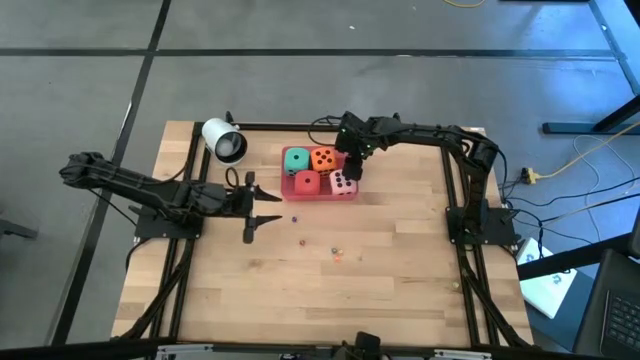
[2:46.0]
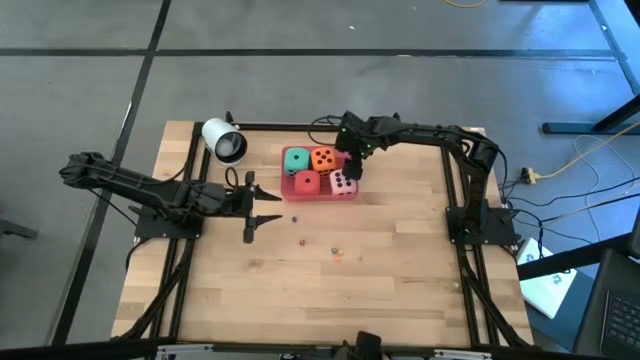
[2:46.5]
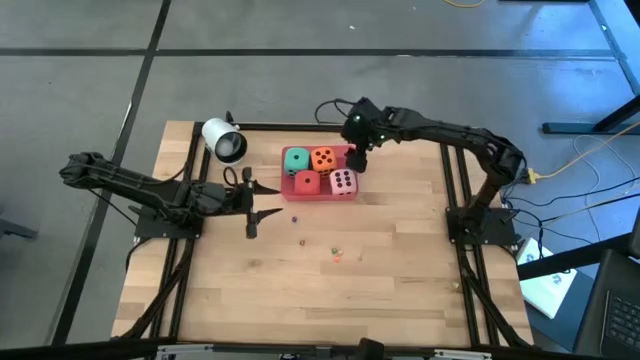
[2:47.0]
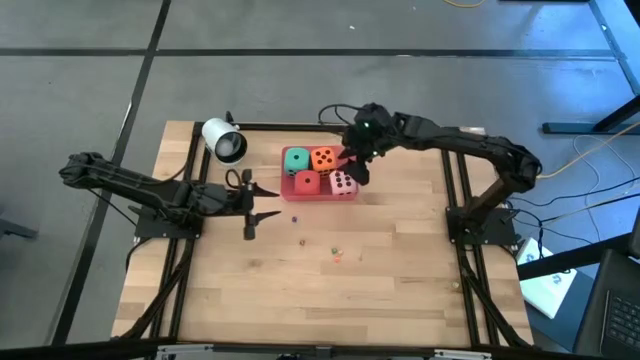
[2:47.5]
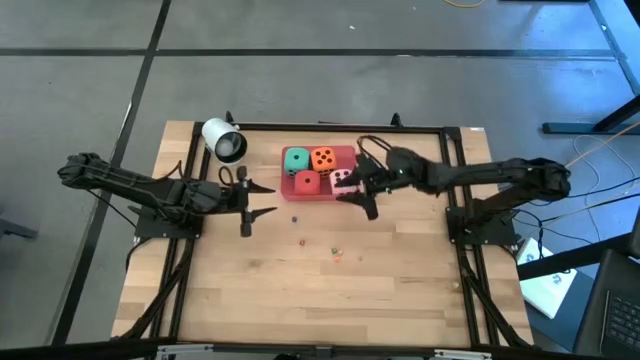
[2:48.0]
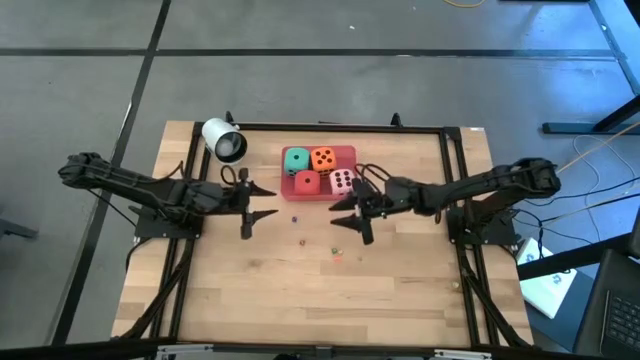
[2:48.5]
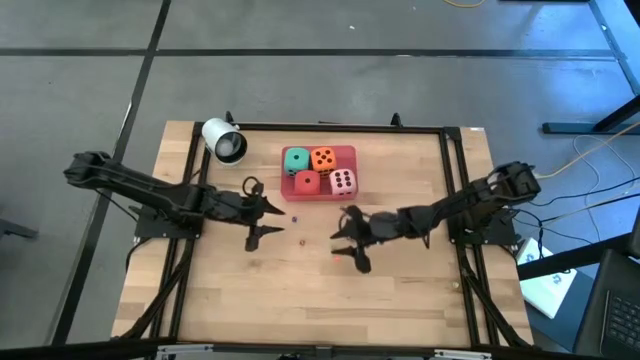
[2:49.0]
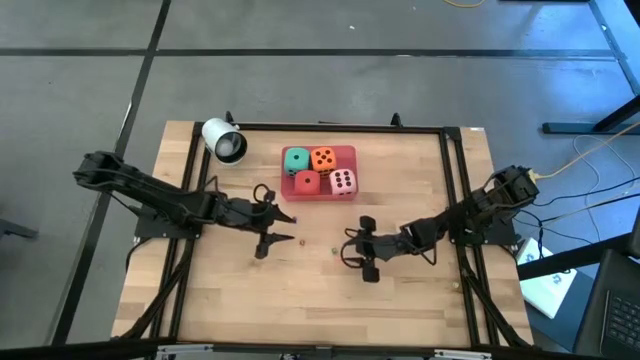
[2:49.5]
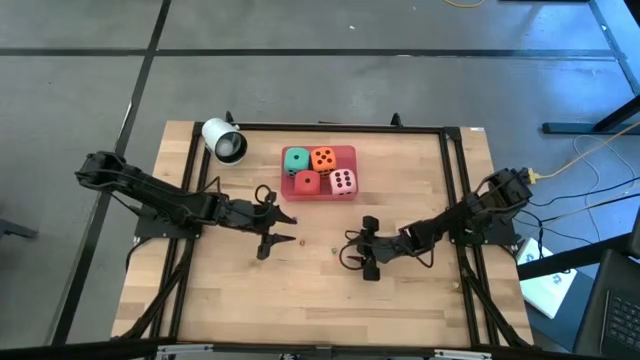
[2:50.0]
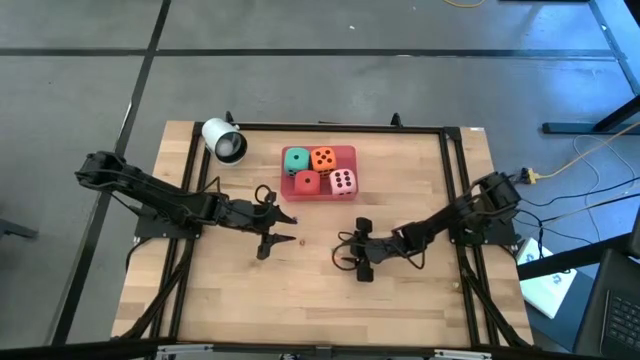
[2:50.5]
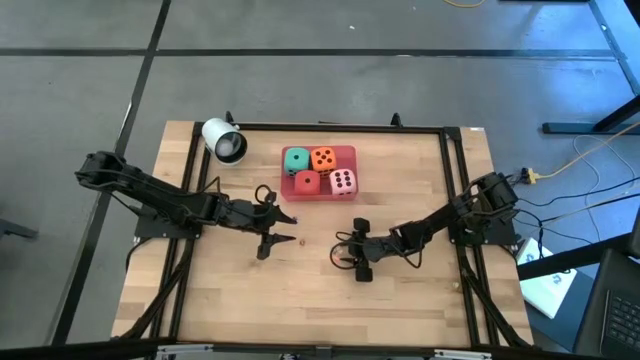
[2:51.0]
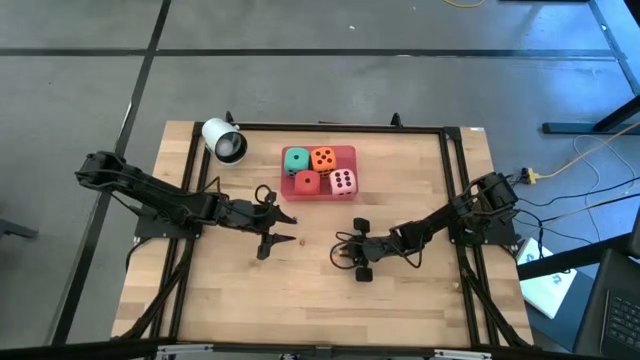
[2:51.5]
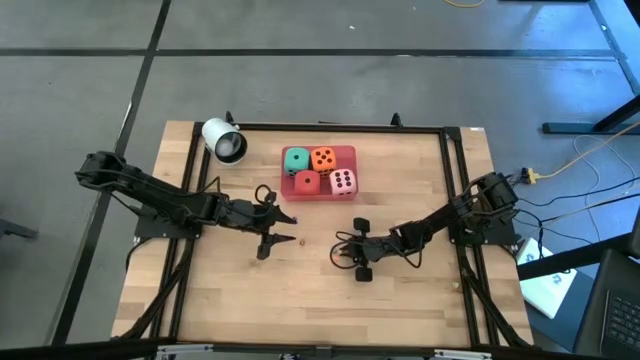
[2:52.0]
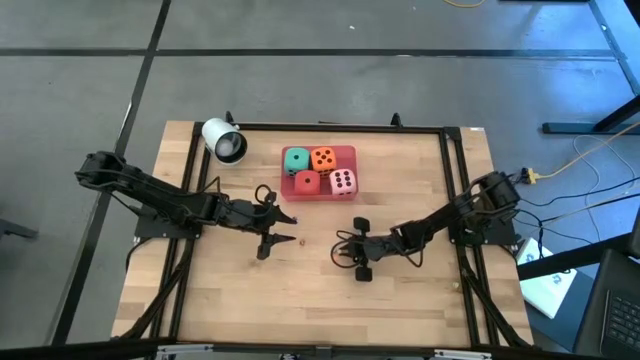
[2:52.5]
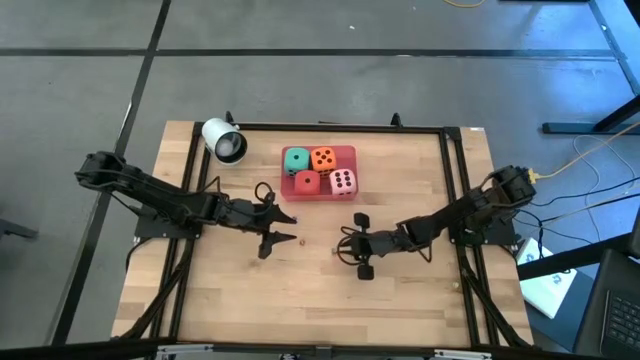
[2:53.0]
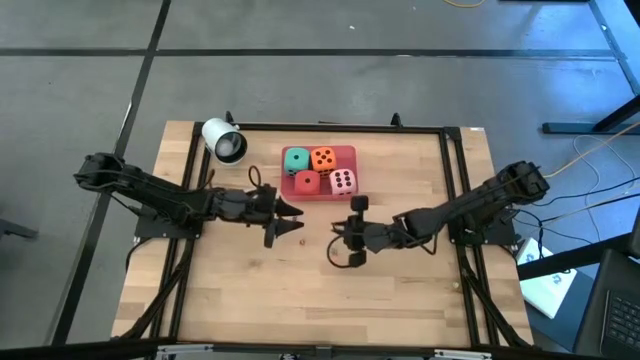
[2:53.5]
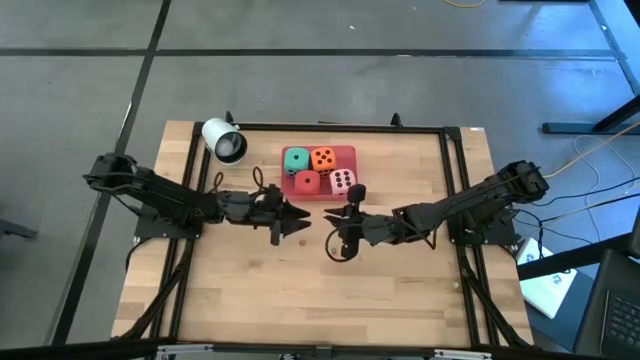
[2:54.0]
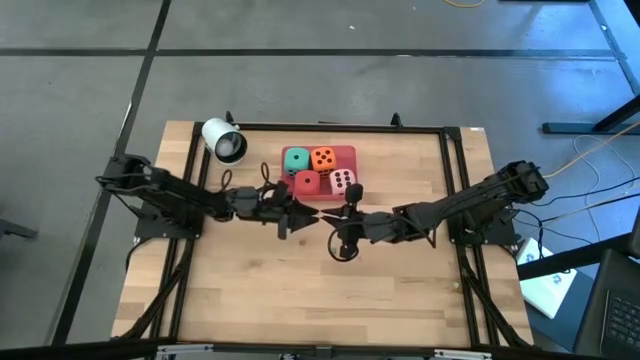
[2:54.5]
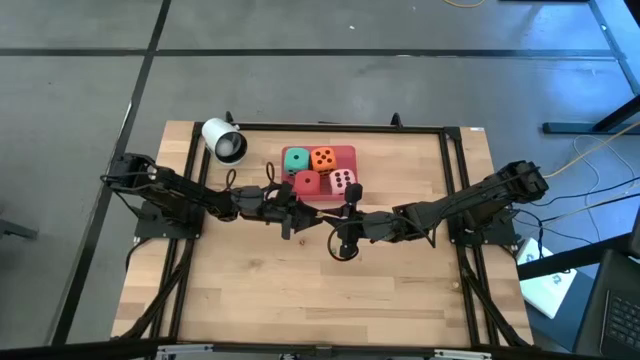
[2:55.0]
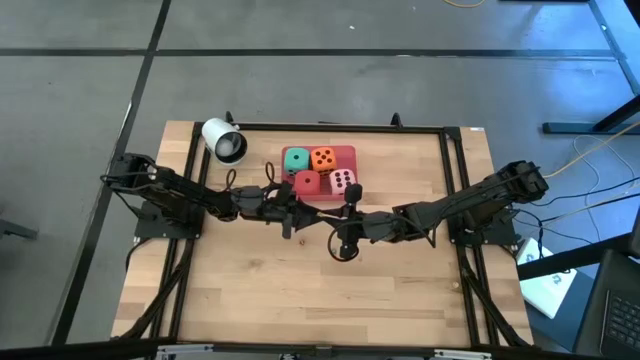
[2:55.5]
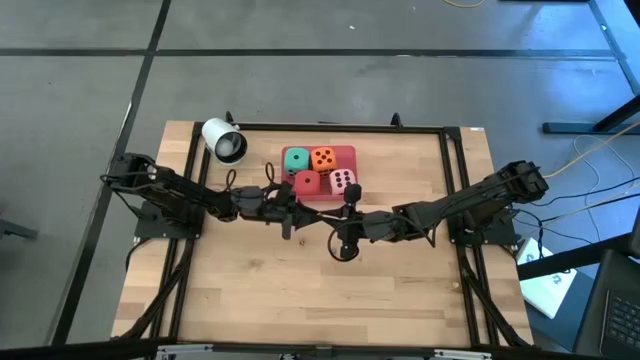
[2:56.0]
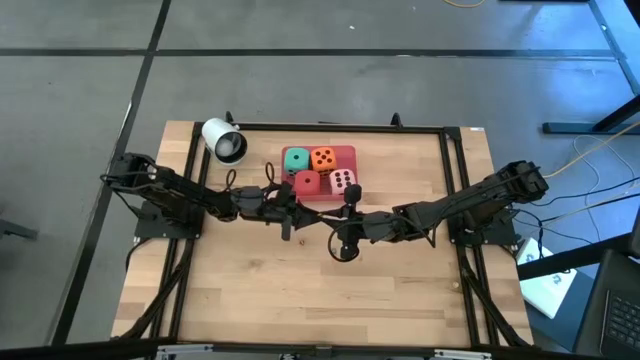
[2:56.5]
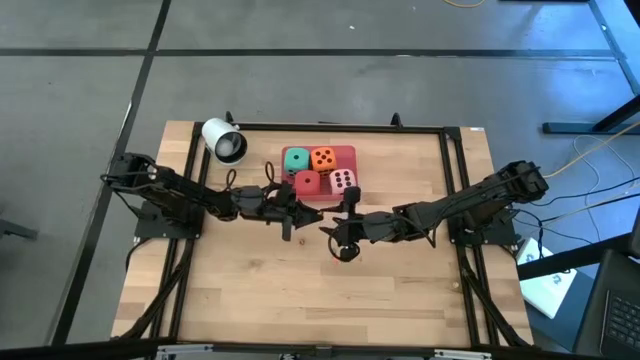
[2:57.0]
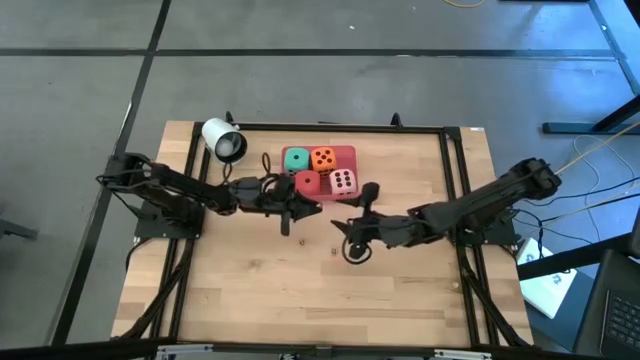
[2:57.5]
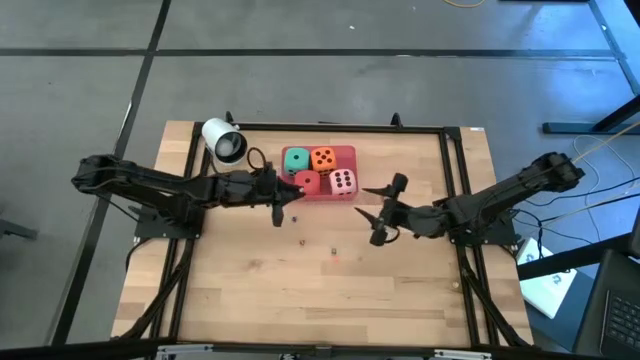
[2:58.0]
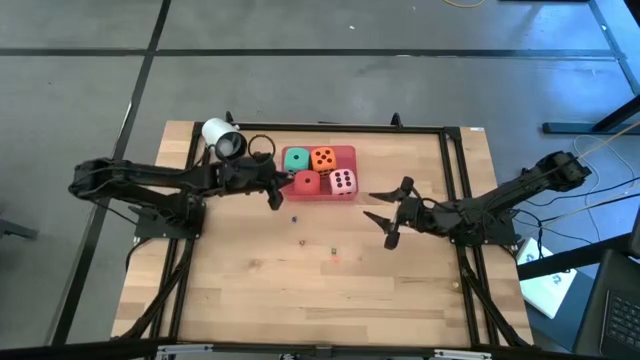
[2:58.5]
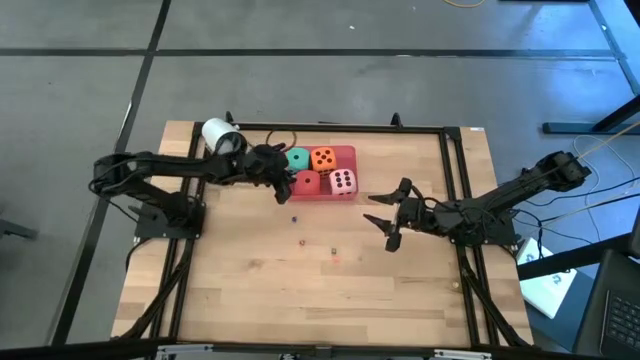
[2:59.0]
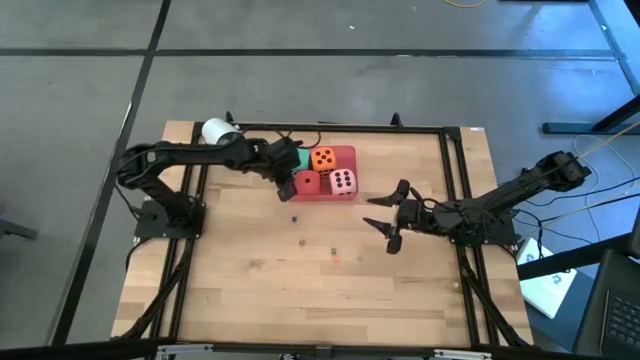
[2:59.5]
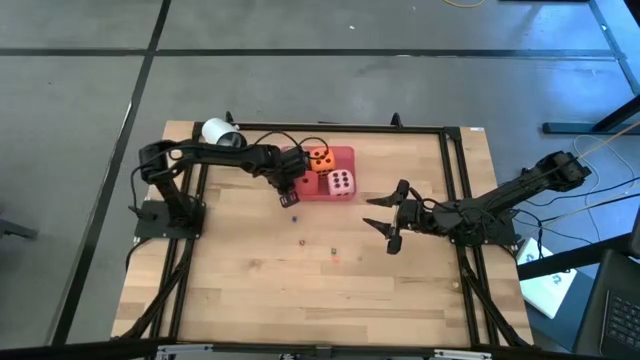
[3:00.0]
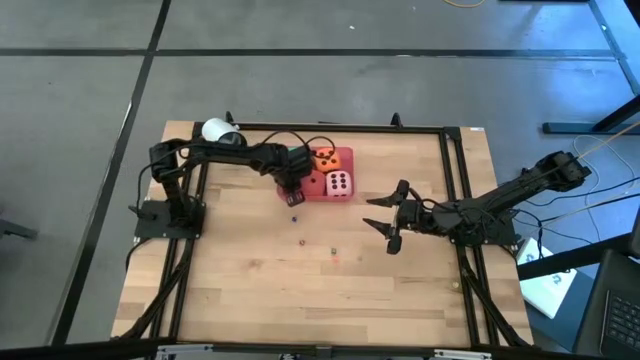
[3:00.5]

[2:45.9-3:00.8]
Task: Pick & Place Dice
Put the small yellow dice into the pink bin

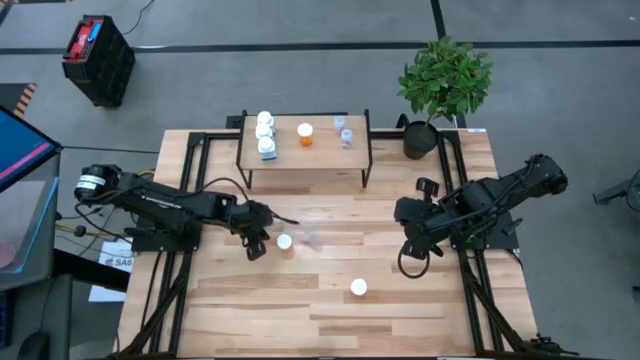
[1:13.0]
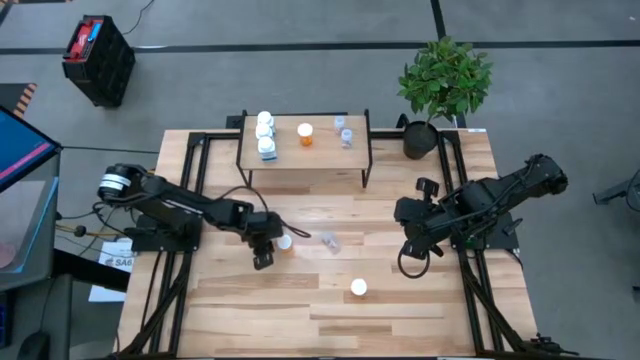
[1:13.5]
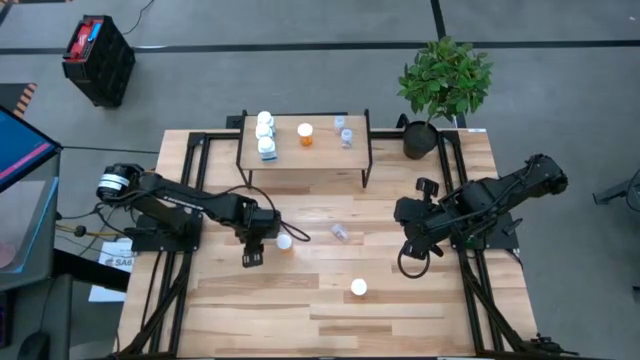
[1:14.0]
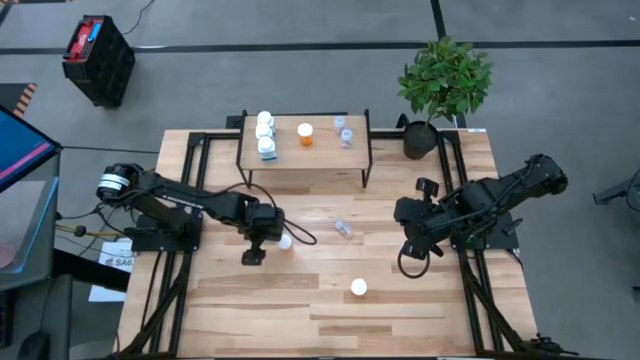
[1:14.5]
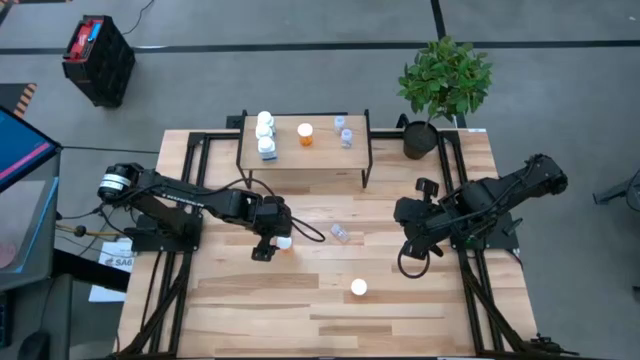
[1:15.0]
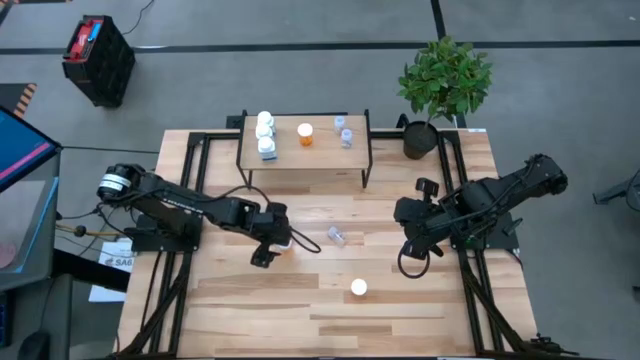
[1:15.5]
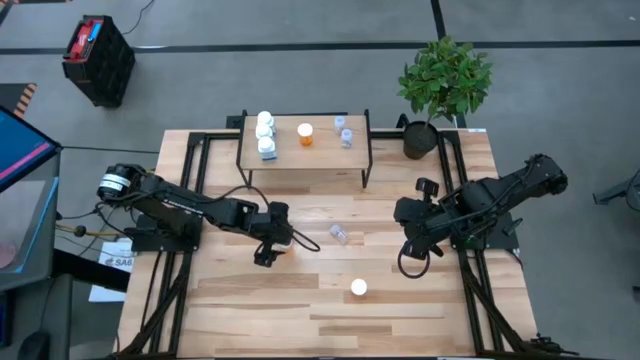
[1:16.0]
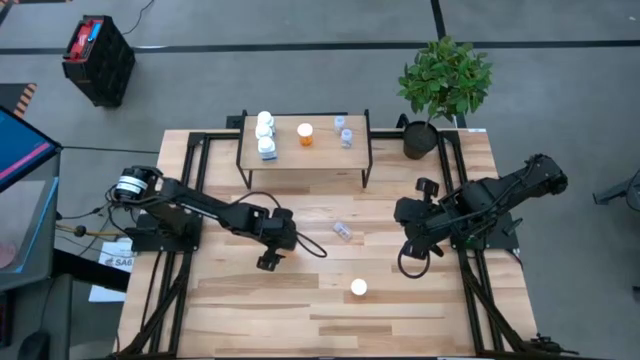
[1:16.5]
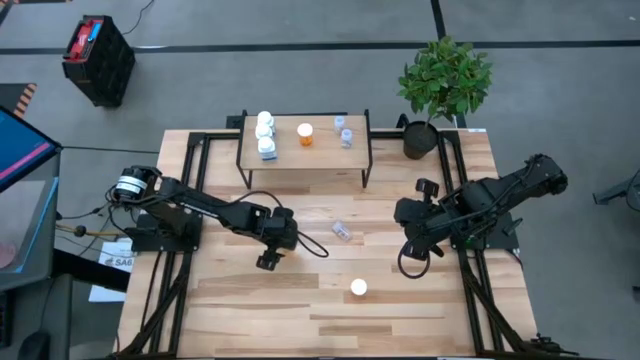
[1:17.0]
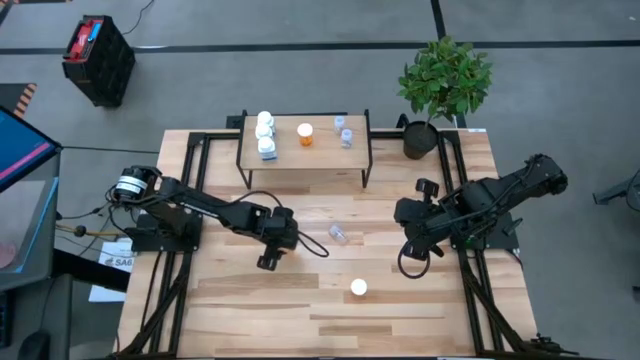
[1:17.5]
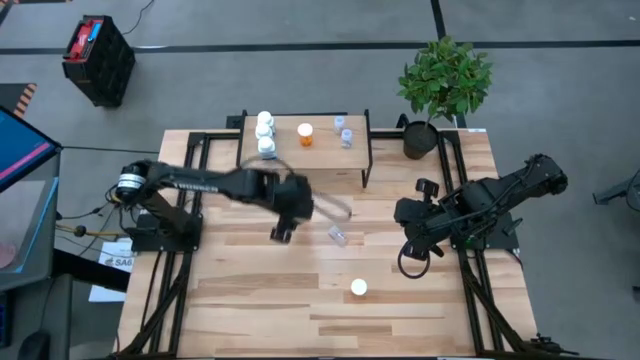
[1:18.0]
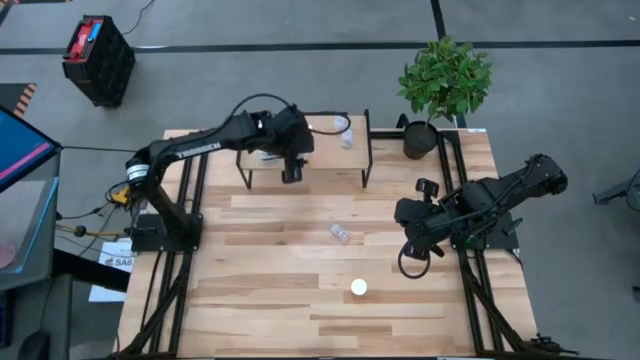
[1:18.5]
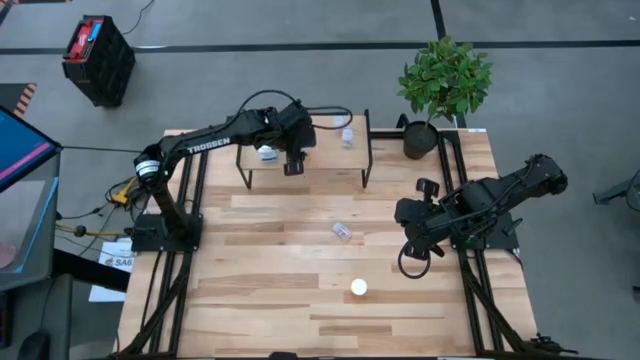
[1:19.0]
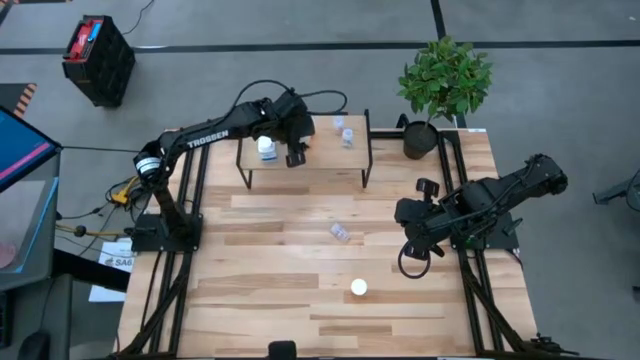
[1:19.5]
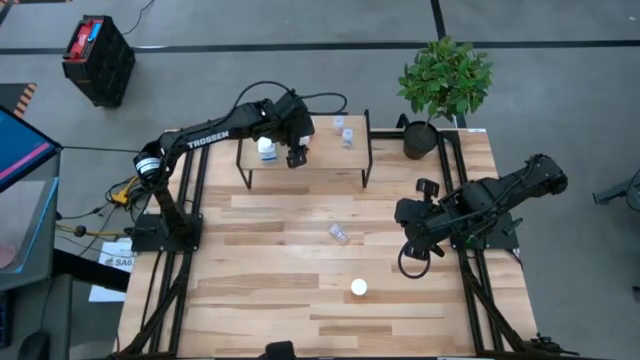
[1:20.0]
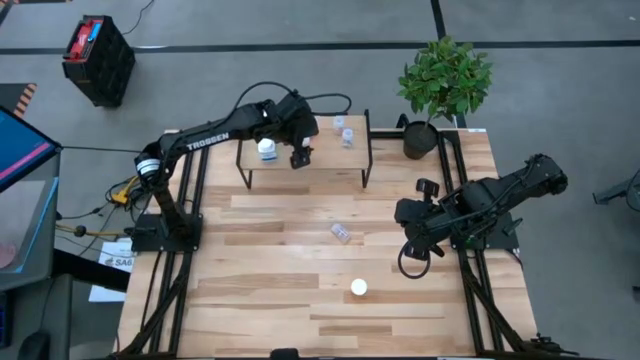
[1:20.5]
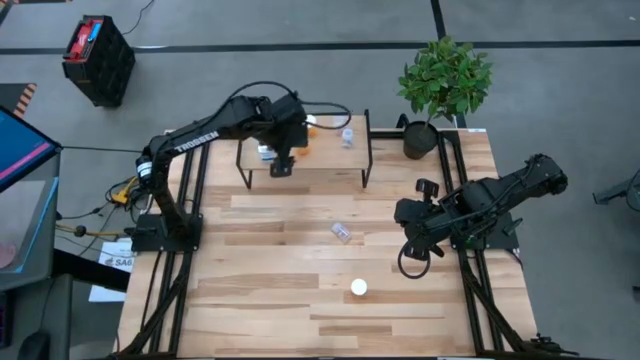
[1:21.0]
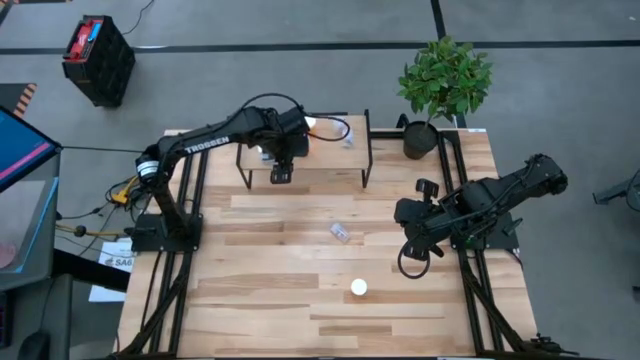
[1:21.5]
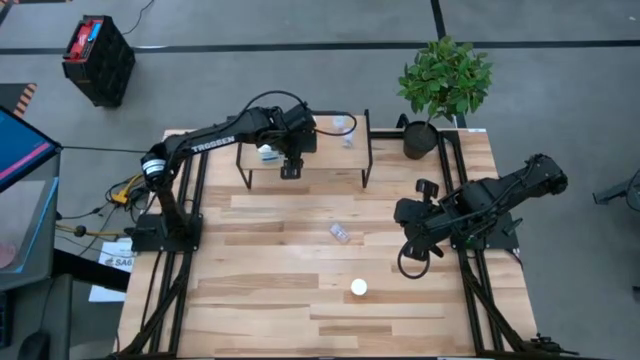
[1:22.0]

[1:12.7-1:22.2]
Task: Pick and place medicine bottles onto shelf by color
Put the top orange pill bottle on the shelf aligned with the other orange pill bottle
